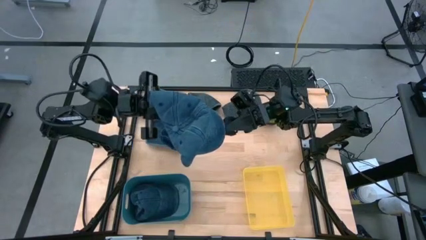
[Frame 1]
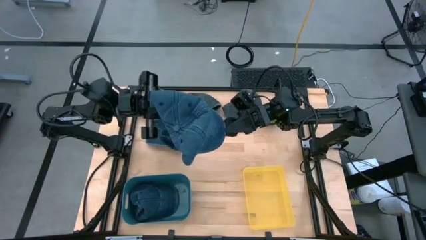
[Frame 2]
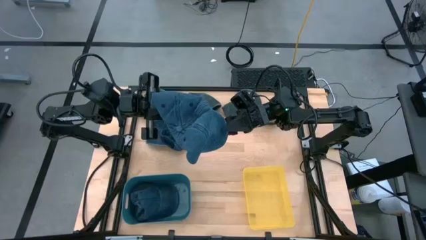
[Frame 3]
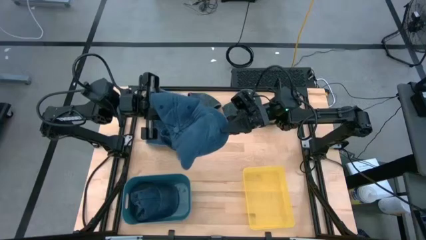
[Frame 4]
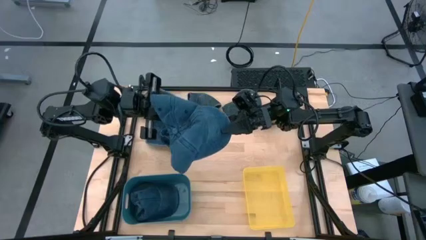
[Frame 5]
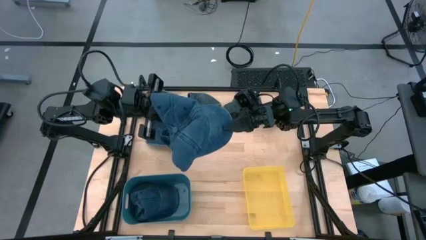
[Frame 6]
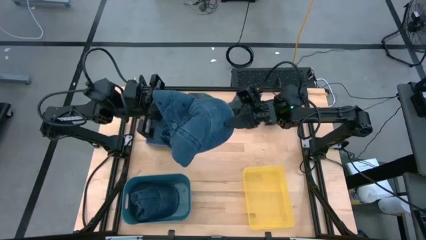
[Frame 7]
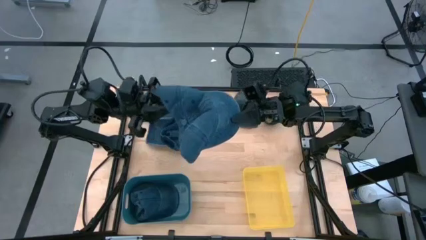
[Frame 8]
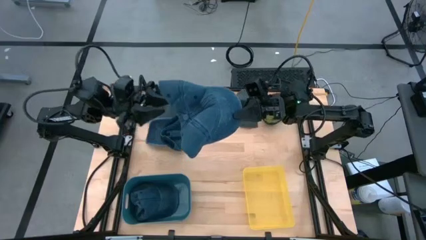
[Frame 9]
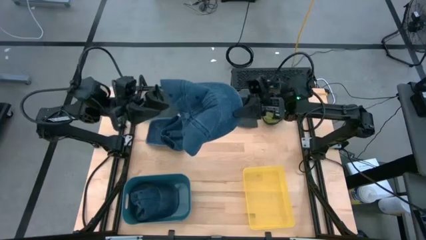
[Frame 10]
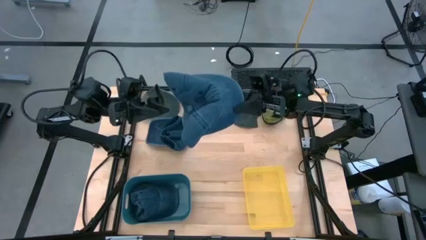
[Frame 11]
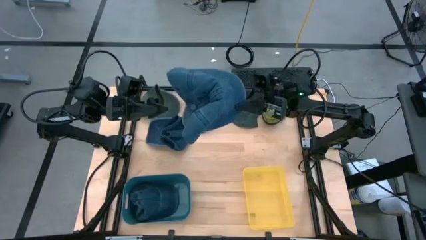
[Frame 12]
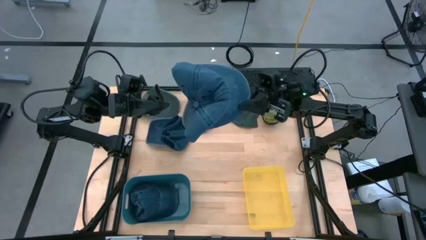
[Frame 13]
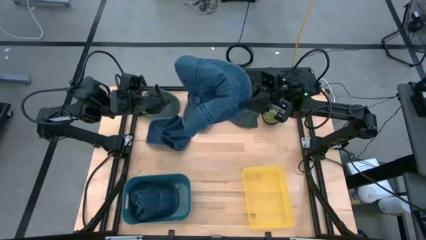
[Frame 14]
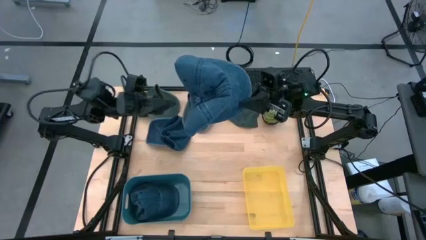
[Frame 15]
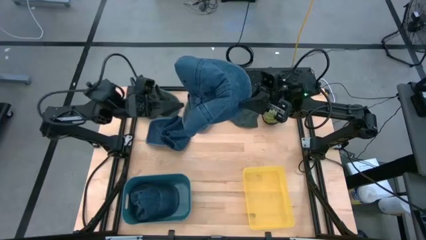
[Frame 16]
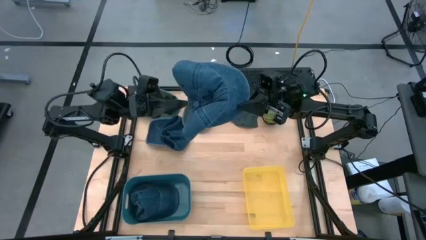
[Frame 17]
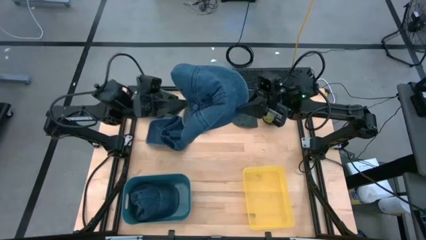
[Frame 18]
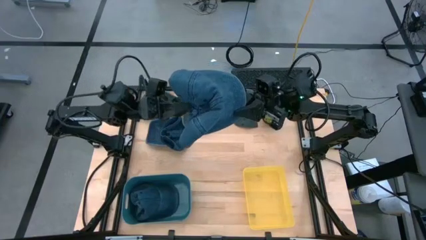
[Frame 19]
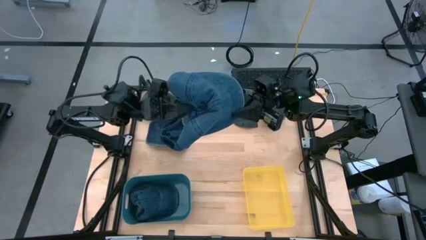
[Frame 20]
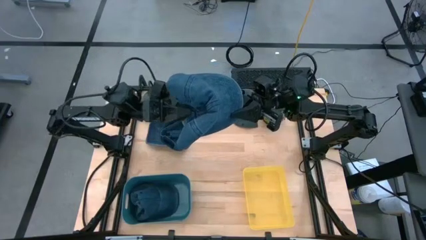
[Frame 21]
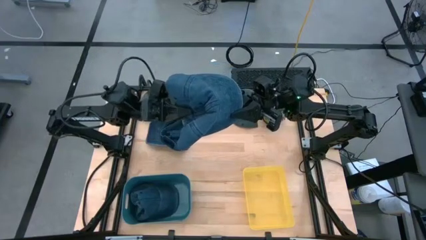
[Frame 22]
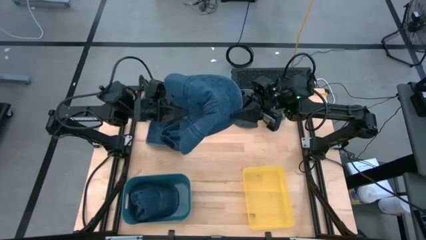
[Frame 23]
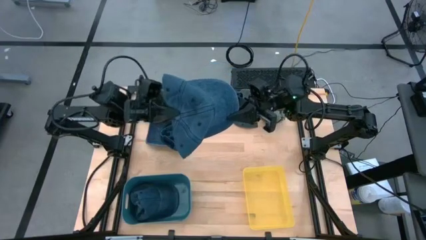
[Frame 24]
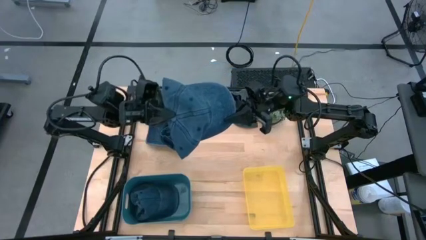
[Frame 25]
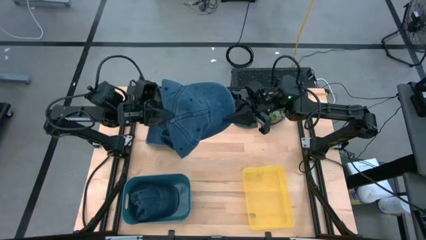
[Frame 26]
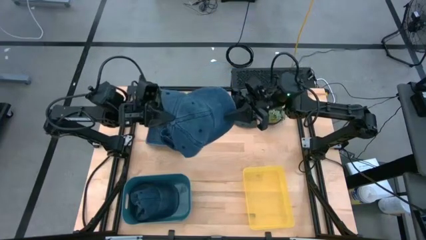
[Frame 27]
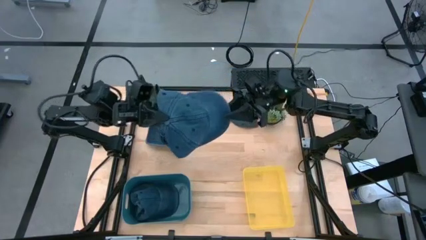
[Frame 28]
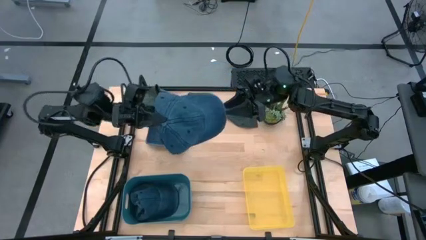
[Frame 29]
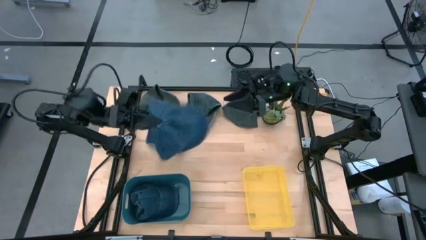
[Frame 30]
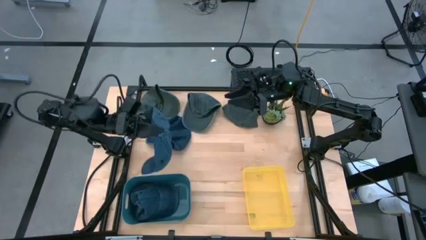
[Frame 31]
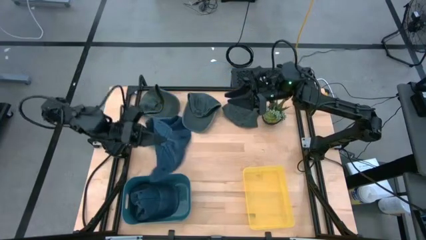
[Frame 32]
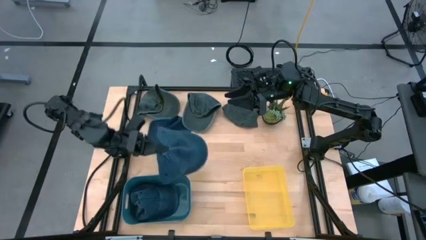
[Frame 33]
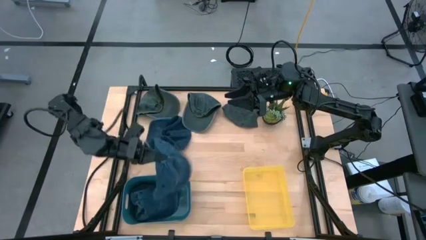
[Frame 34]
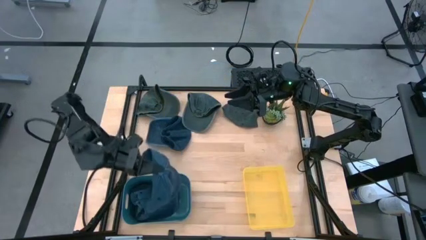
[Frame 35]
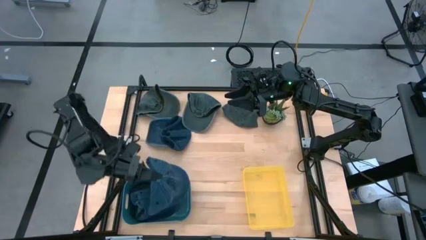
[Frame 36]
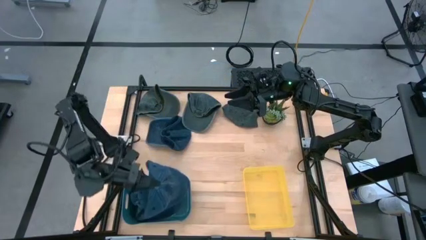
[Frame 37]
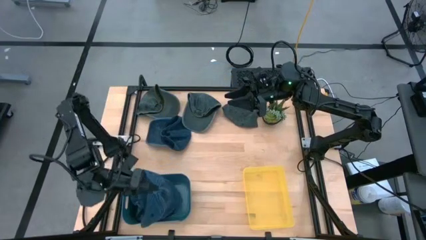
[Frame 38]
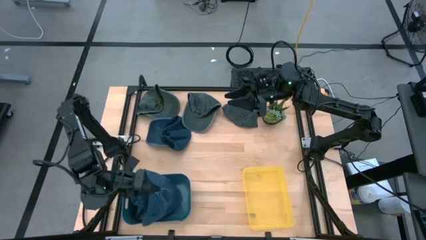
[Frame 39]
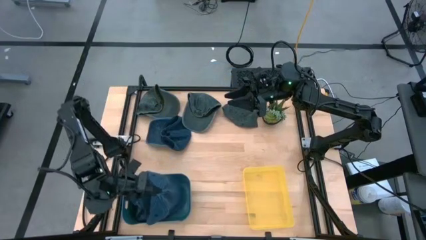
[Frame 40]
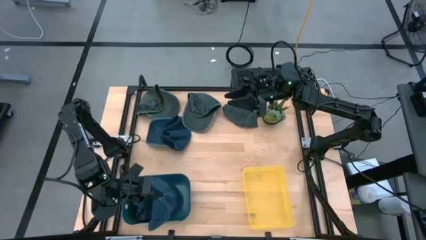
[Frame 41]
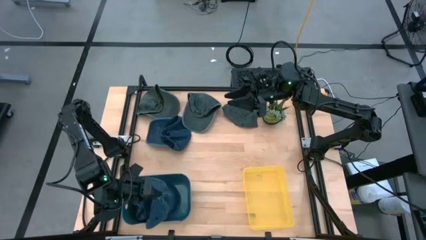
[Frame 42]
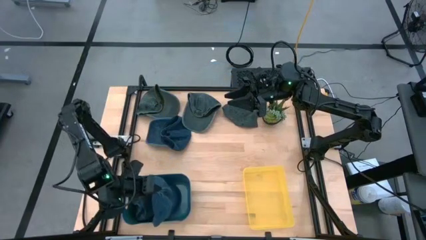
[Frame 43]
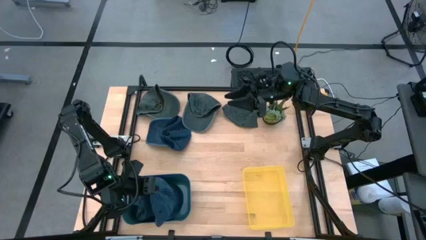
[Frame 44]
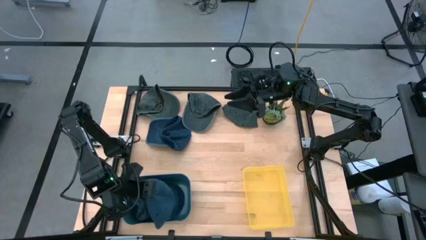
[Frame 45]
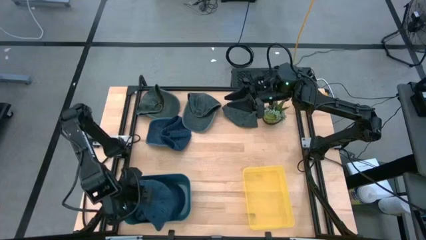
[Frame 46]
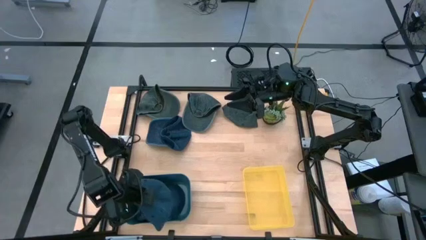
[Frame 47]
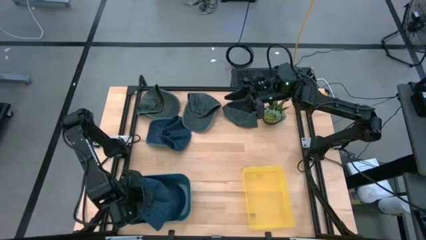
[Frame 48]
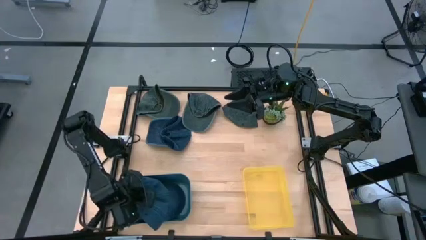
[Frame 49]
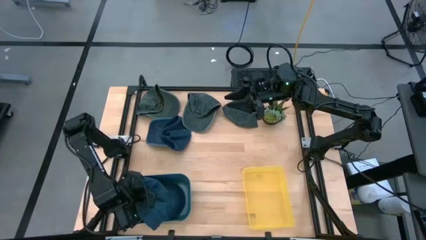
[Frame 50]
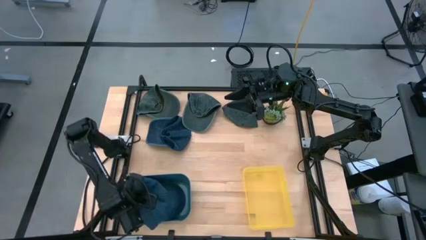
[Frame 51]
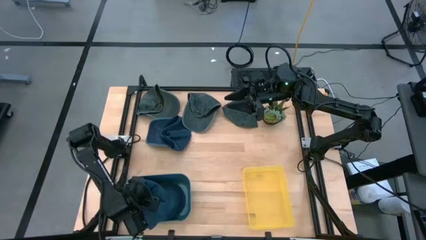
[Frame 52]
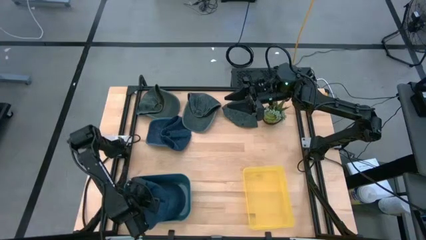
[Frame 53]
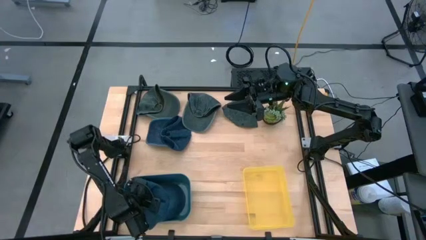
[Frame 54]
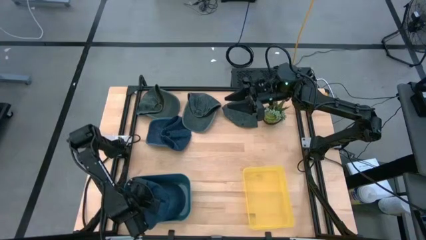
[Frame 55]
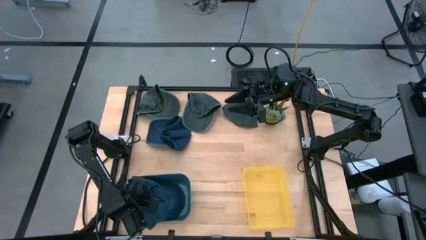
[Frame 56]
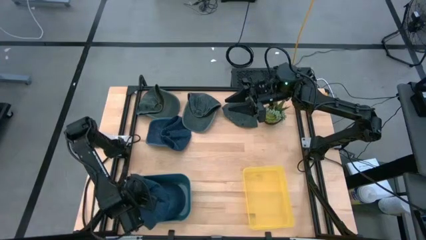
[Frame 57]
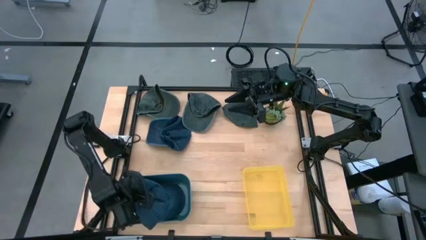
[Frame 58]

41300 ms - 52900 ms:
Task: Pick & Place hat
Put the right dark blue cap into the blue bin

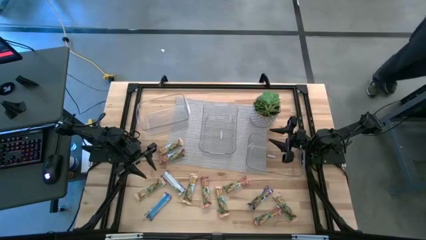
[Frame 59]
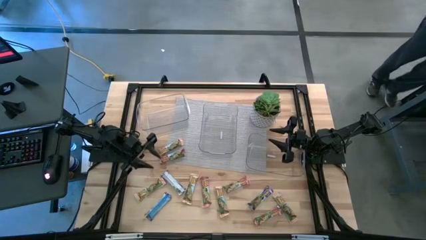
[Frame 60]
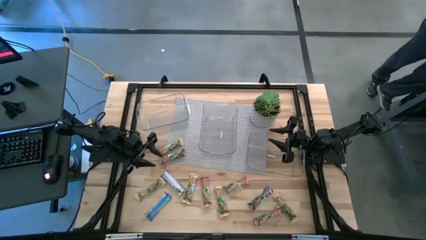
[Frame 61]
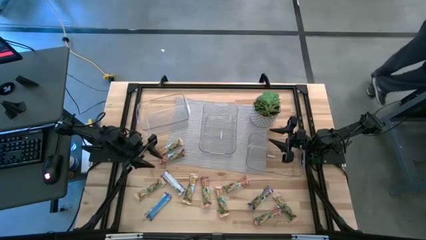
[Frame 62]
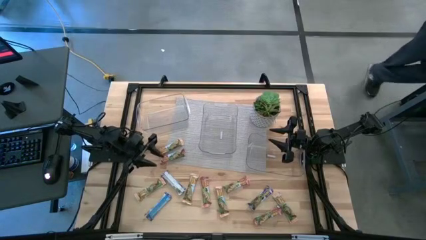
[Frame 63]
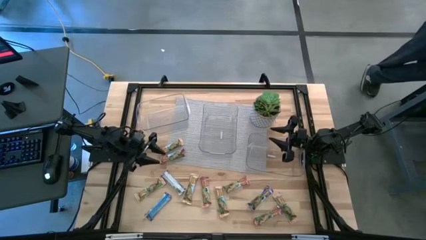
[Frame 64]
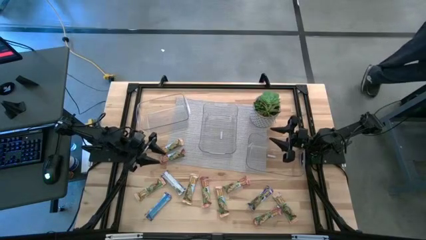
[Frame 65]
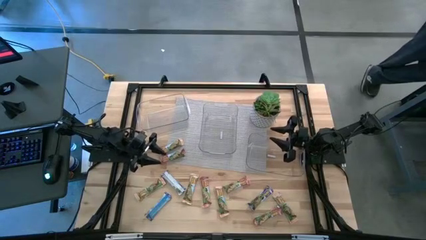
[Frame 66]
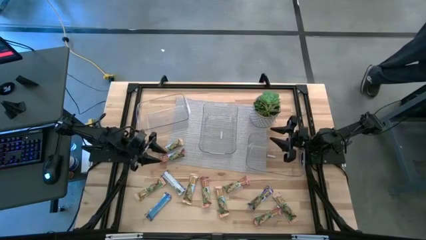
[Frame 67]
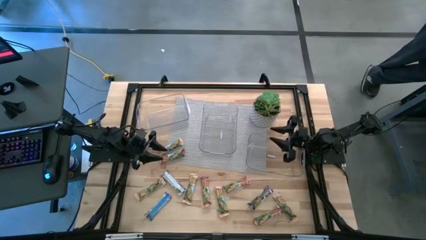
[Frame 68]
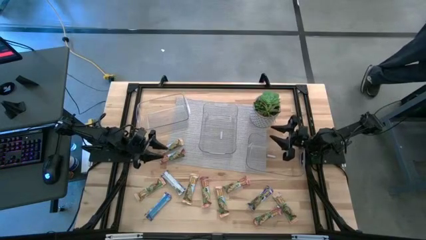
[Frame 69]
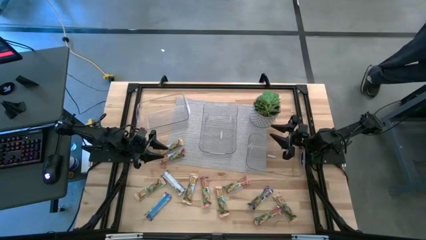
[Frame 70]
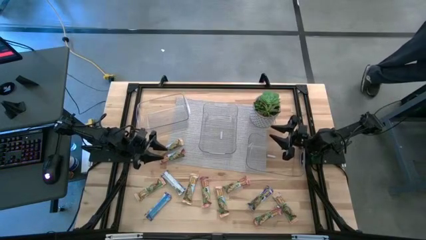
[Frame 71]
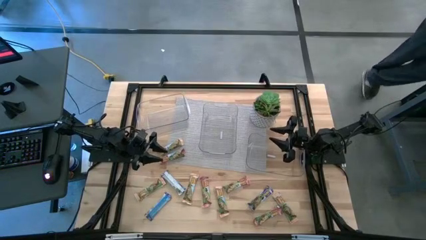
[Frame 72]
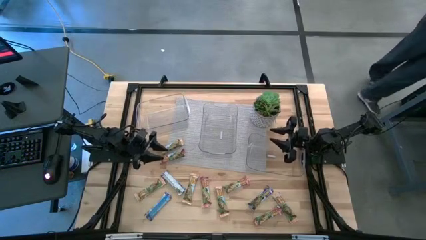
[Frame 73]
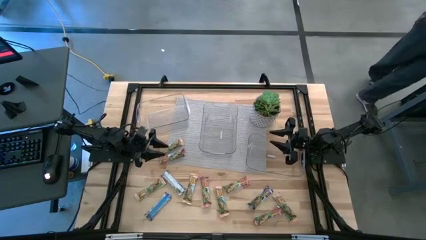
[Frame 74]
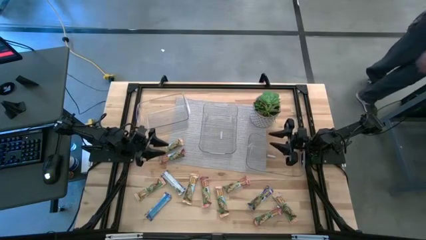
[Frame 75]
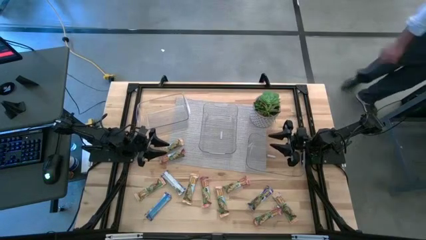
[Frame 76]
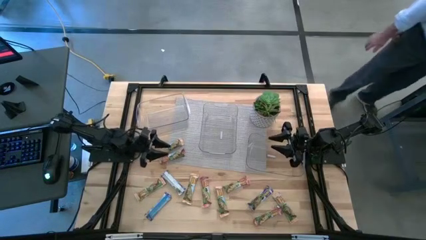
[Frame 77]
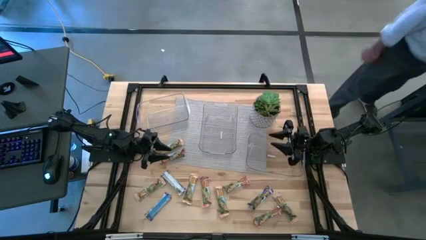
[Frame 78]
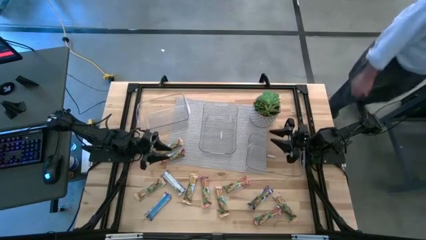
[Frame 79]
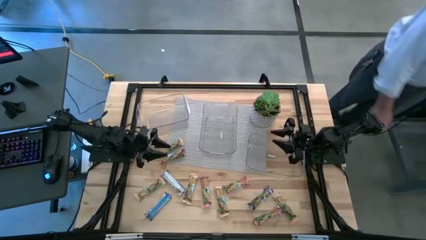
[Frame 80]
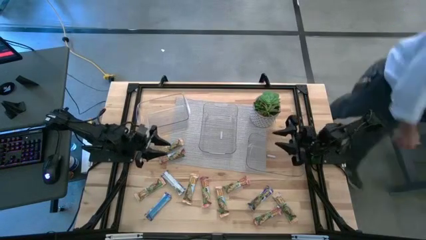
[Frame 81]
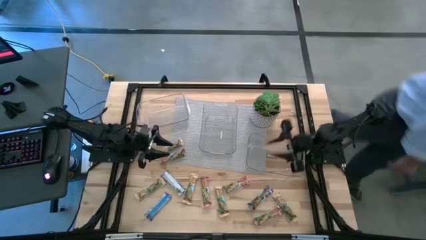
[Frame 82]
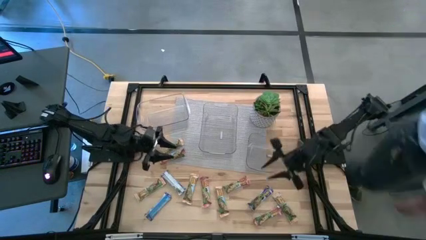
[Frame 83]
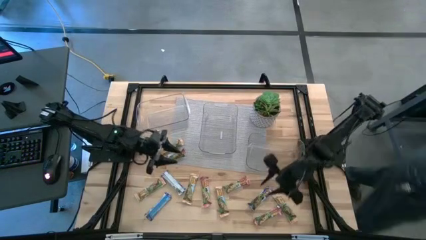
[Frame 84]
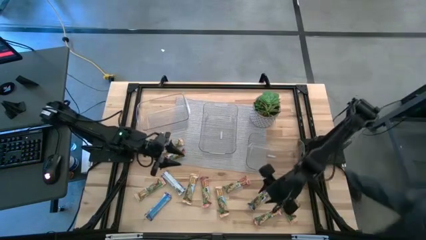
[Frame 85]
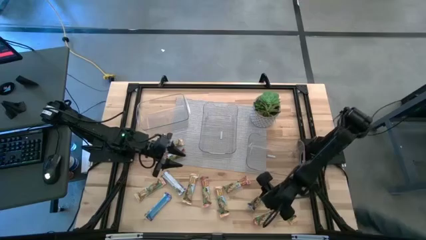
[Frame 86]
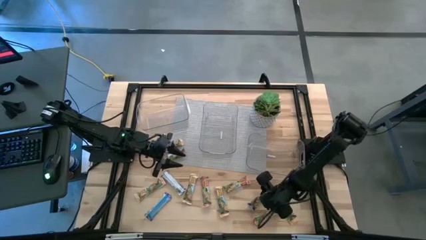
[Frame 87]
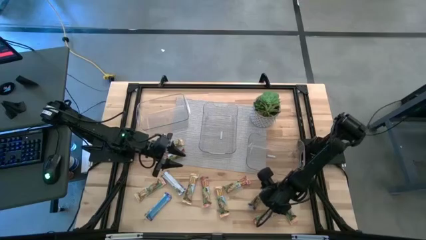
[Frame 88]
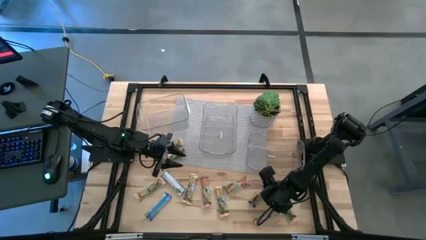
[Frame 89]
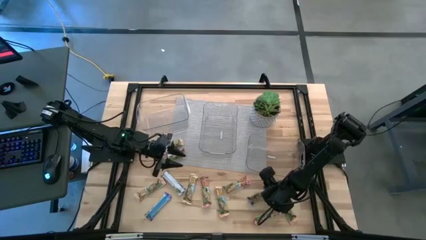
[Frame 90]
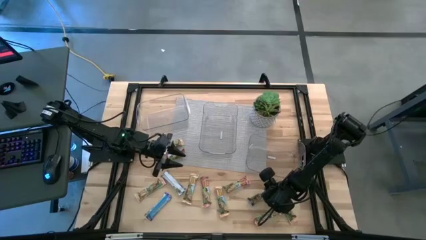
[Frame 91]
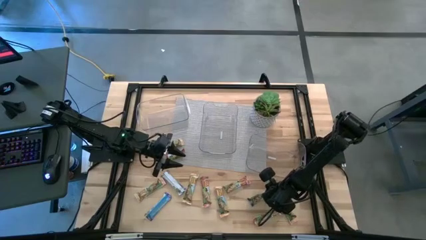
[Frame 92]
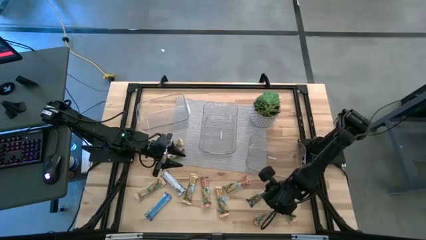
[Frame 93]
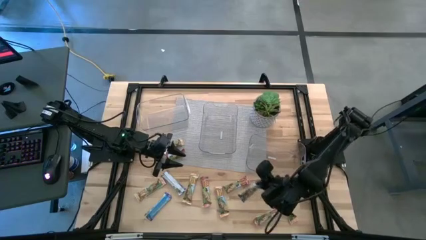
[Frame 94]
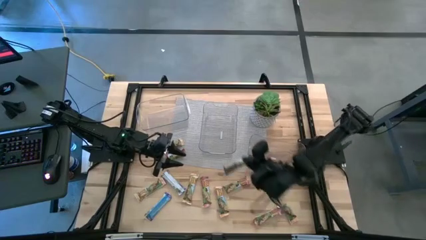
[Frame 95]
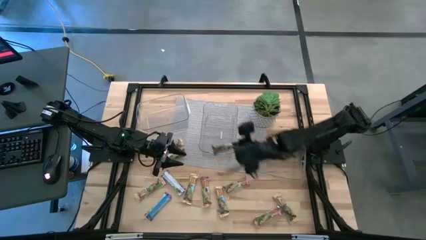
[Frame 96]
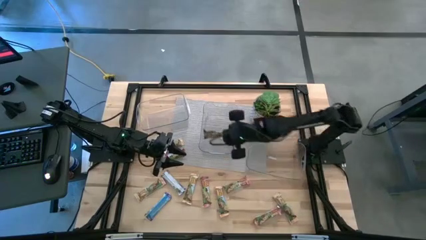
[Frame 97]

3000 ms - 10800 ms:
Task: Pick and place Granola Bars by type
Put the blue granola bar into the middle transparent bin
